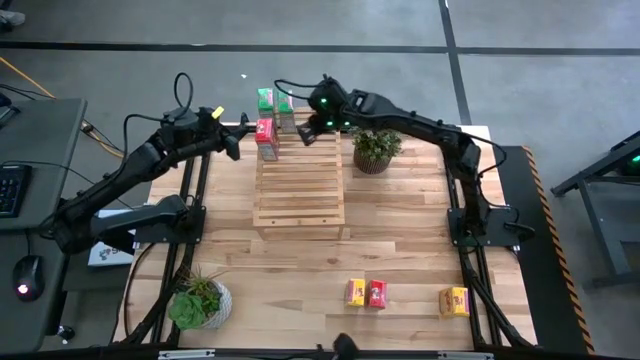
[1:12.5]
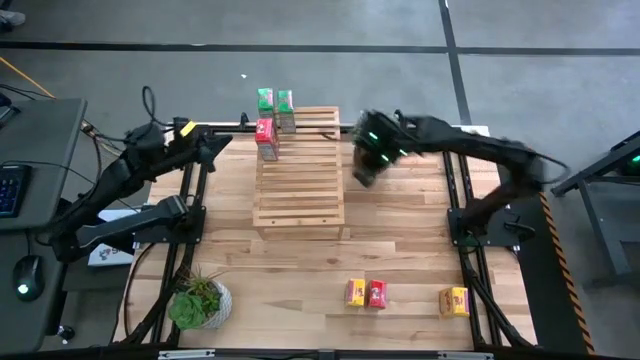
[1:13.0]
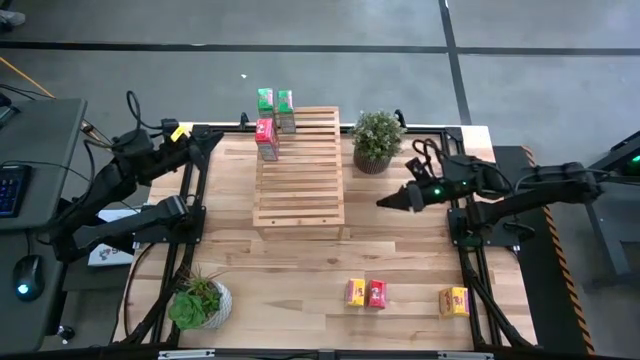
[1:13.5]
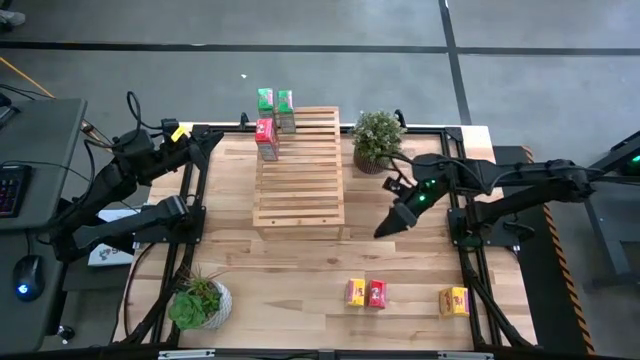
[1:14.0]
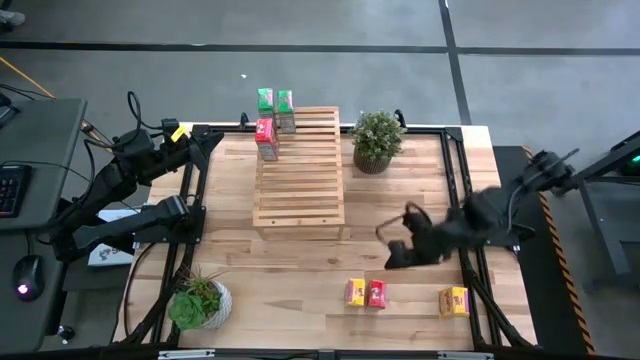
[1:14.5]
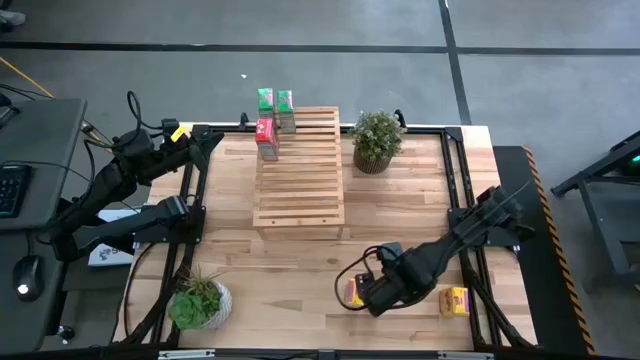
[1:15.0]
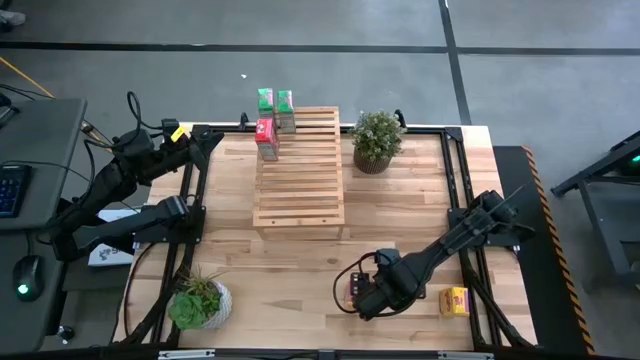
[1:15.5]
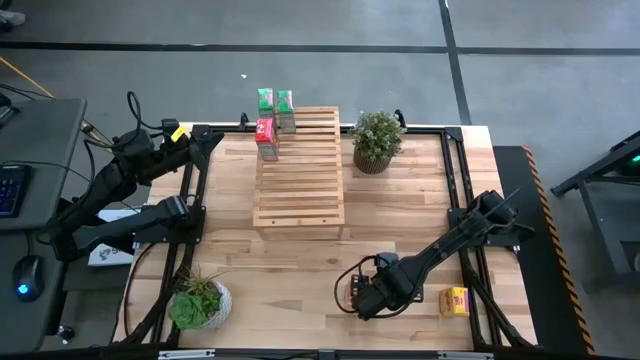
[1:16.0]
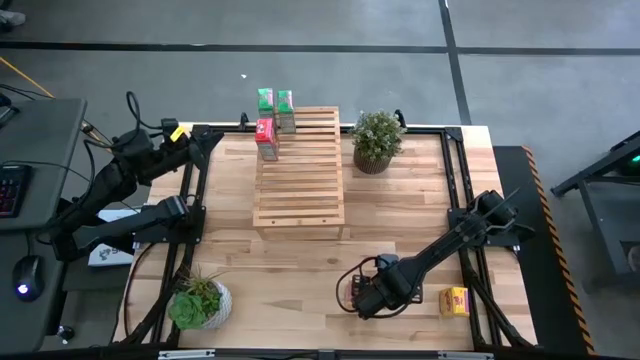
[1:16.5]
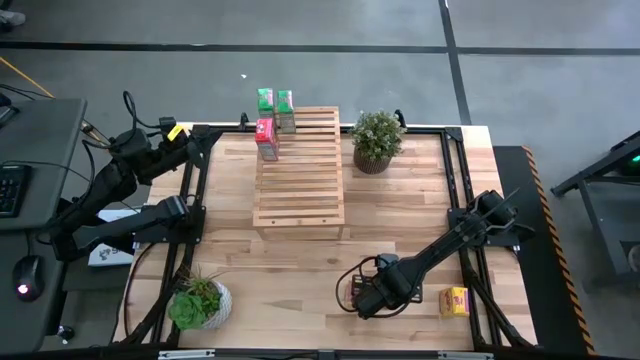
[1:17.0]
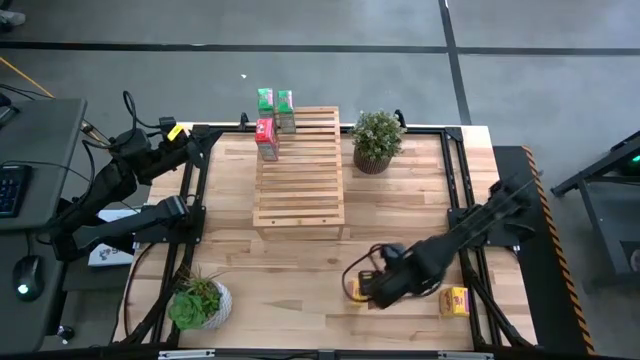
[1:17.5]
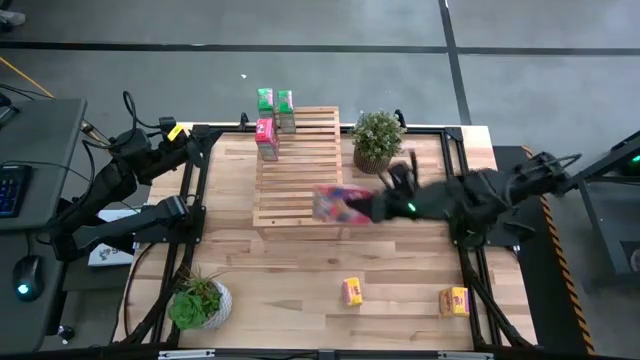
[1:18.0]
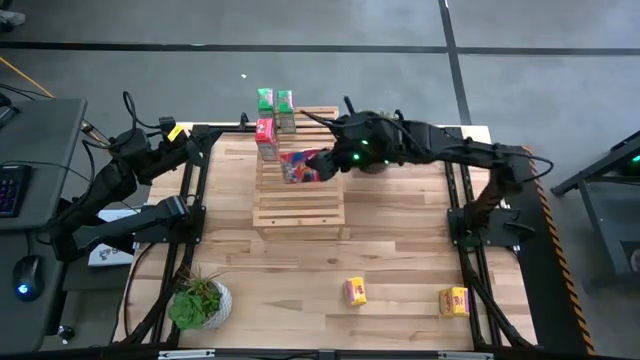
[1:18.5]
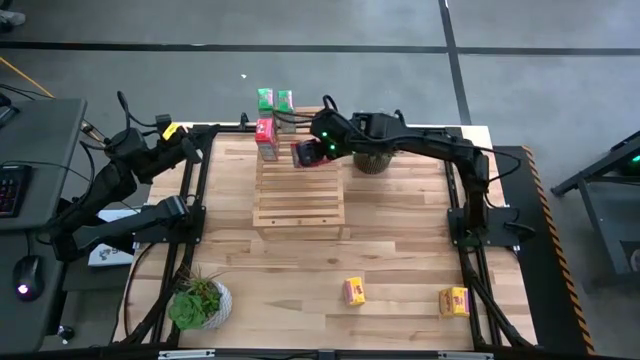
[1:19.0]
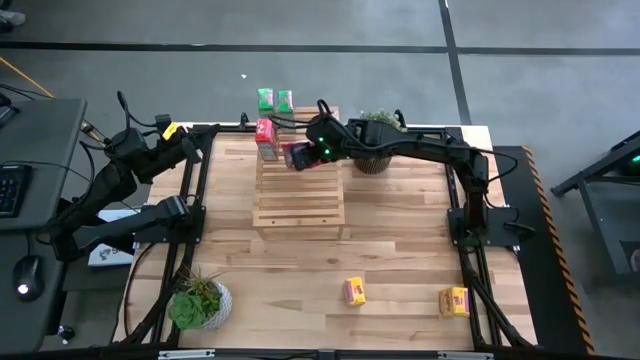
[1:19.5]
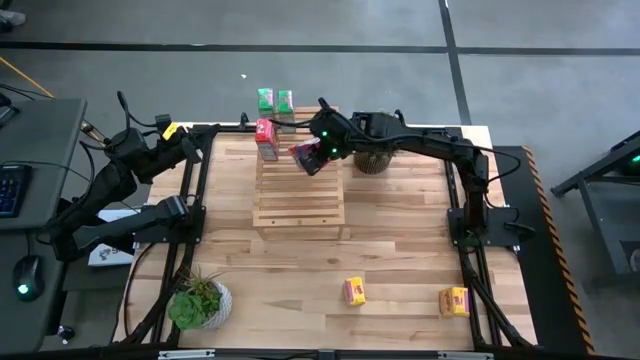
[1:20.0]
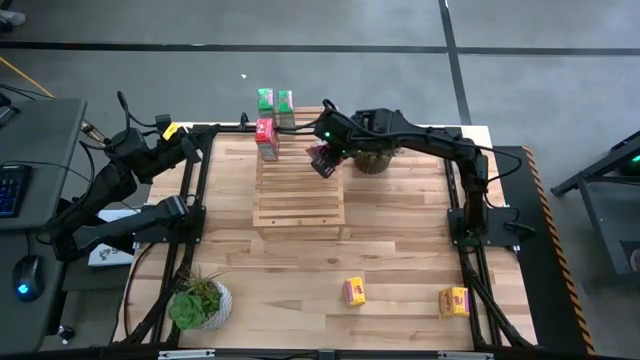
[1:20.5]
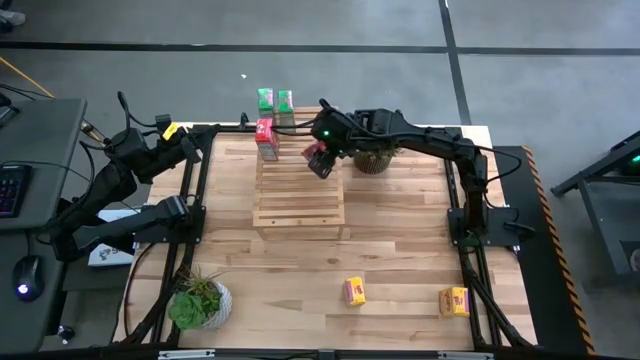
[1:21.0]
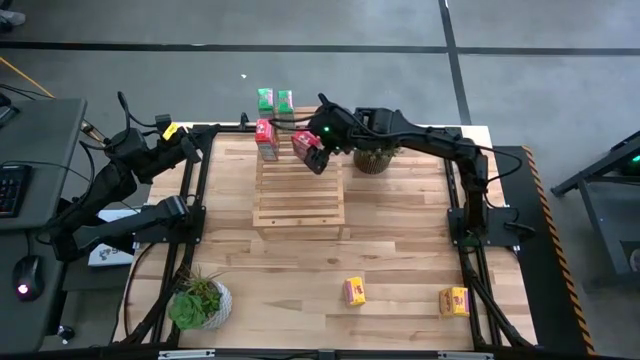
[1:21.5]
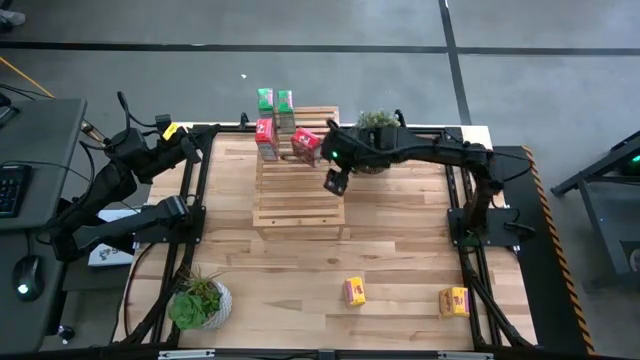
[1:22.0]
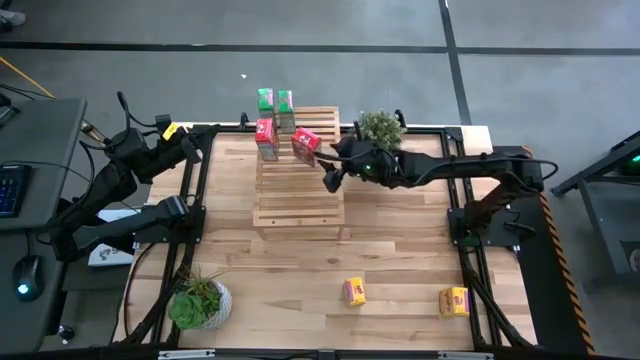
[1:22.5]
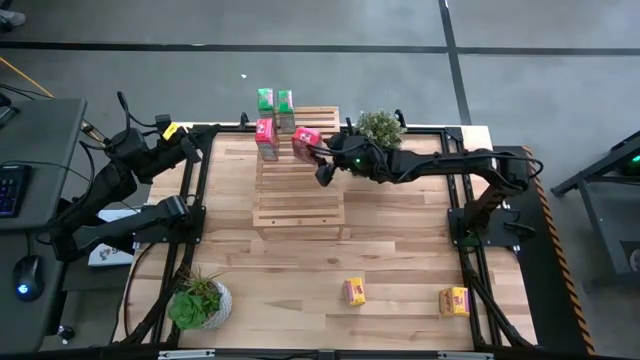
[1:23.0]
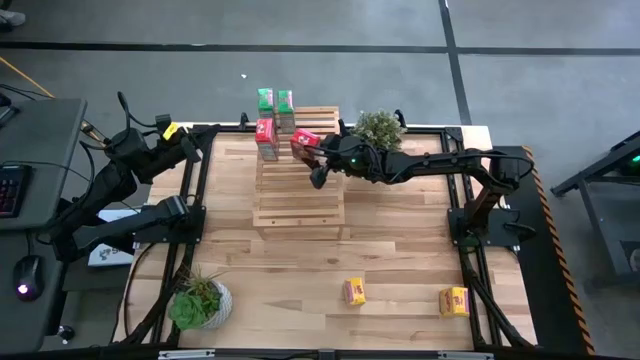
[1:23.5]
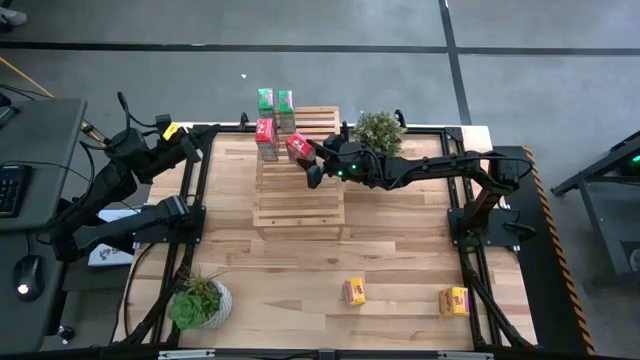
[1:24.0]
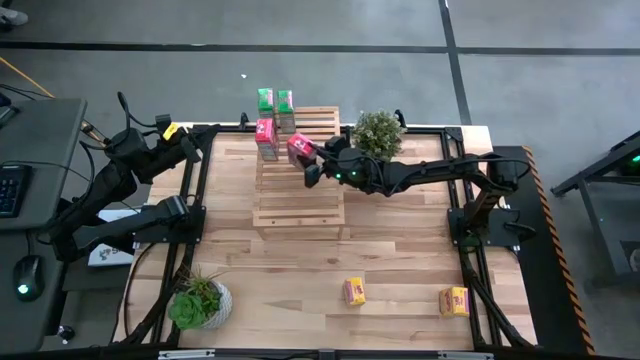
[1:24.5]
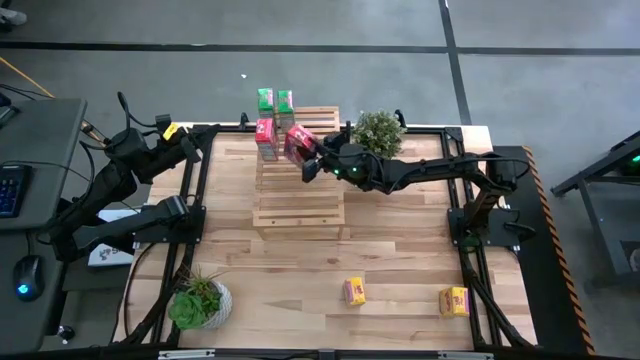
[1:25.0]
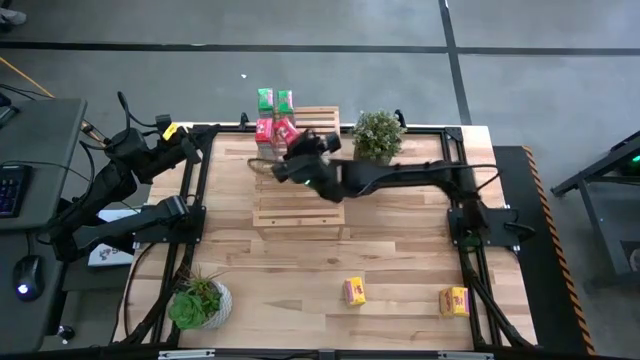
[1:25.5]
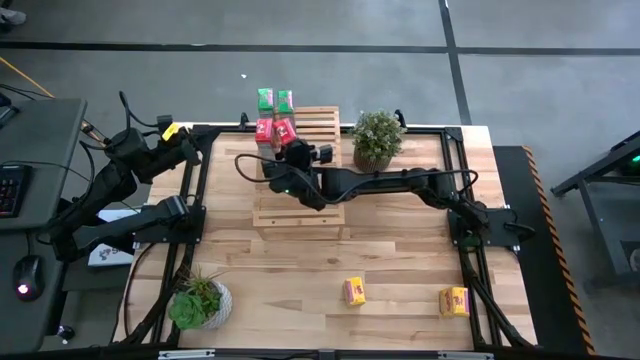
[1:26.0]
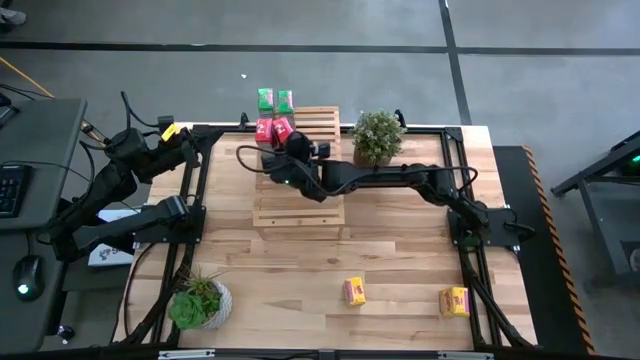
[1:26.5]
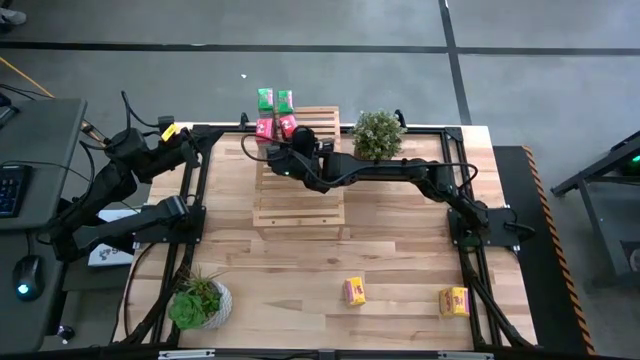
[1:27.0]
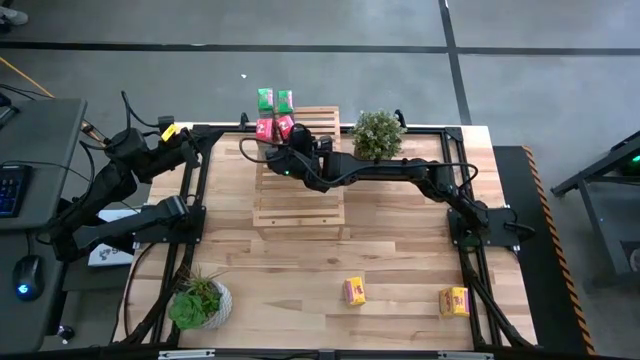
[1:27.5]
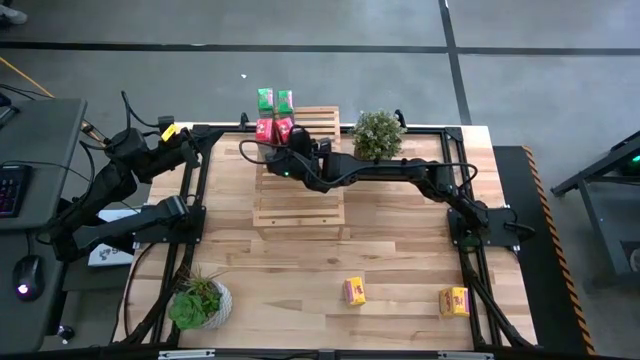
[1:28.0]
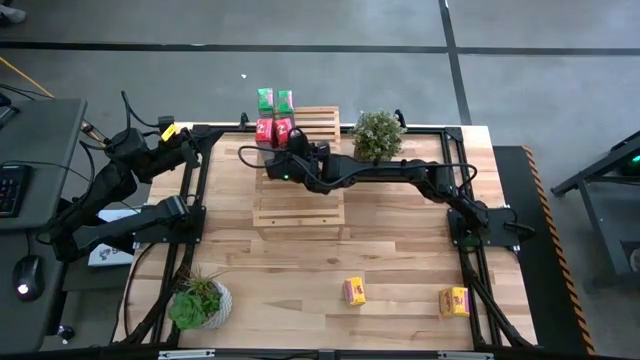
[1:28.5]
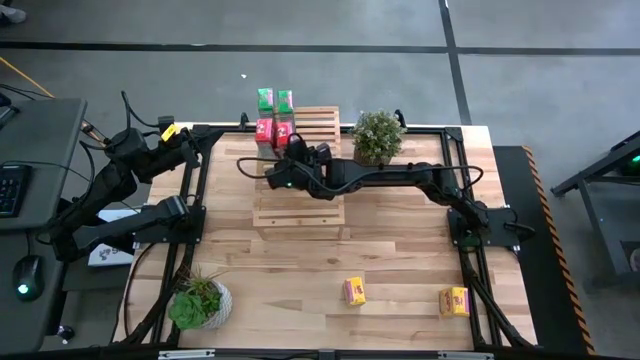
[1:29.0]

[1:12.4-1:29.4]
Task: Stack cereal on shelf
Put the red cereal box aligned with the other red cereal box on the shelf

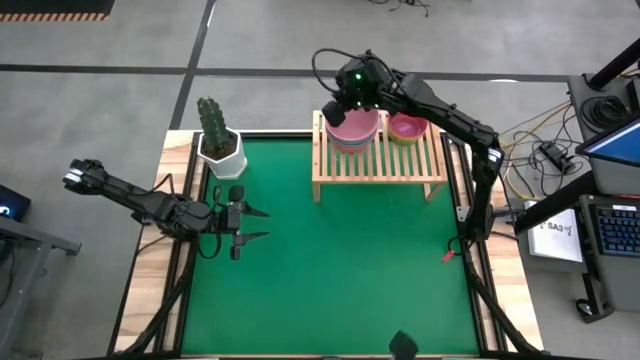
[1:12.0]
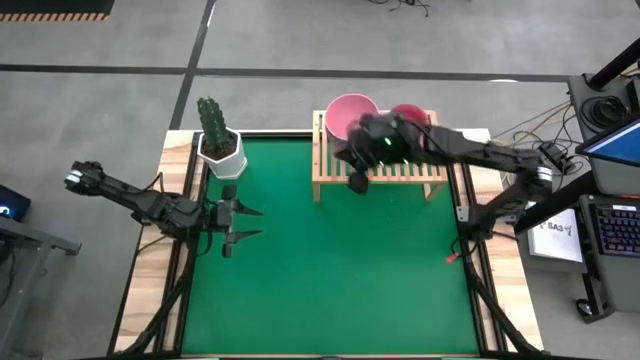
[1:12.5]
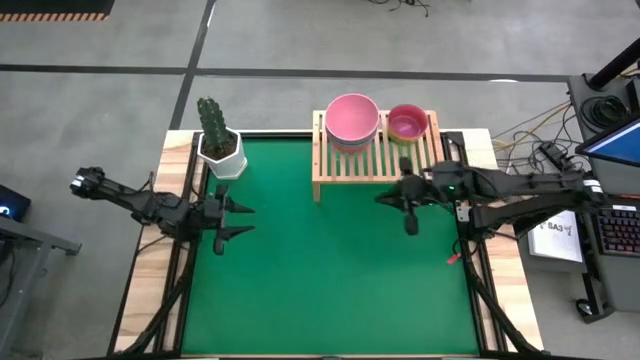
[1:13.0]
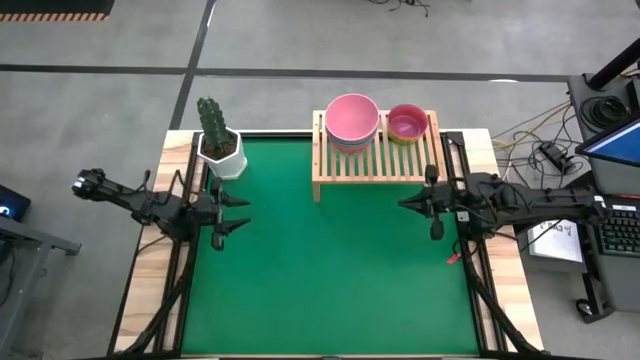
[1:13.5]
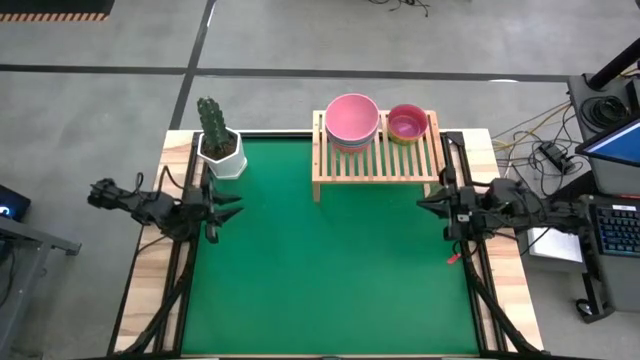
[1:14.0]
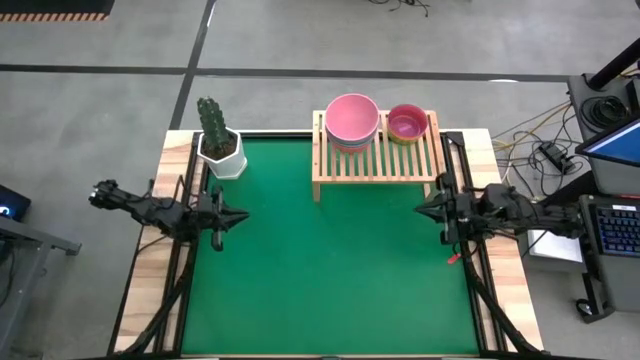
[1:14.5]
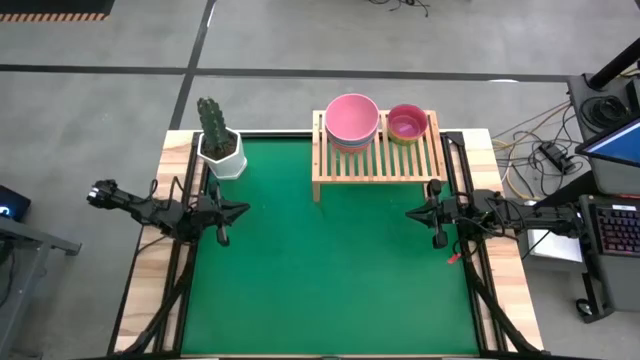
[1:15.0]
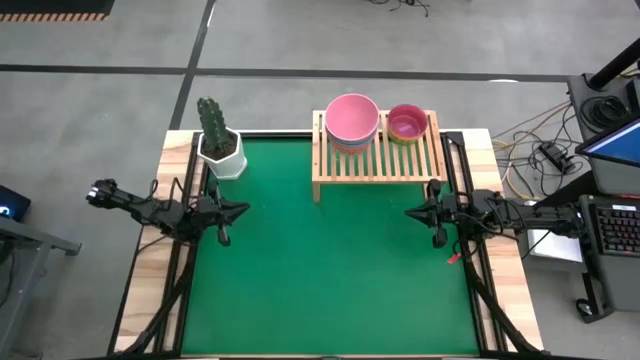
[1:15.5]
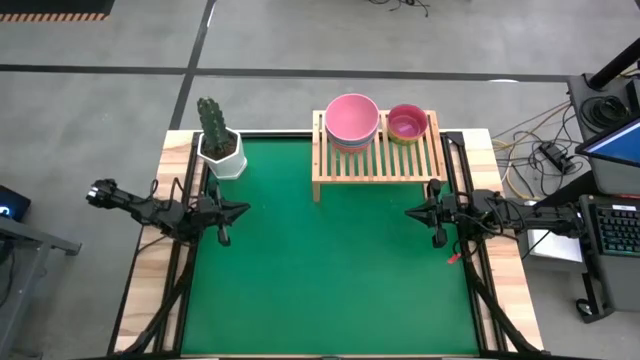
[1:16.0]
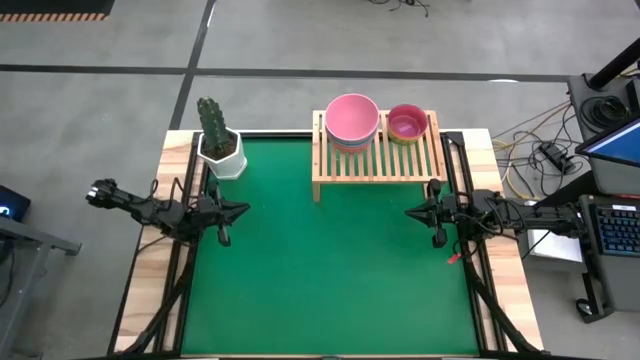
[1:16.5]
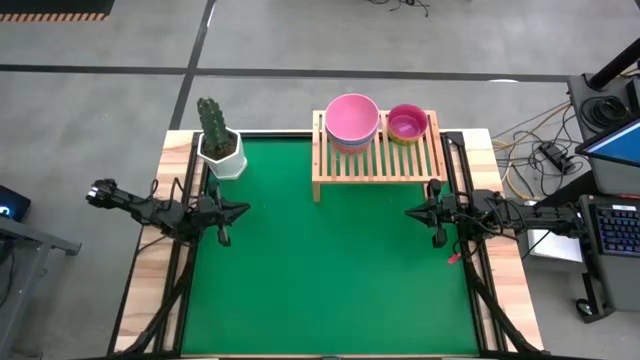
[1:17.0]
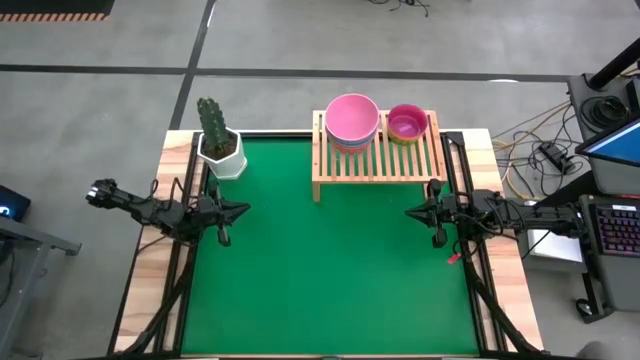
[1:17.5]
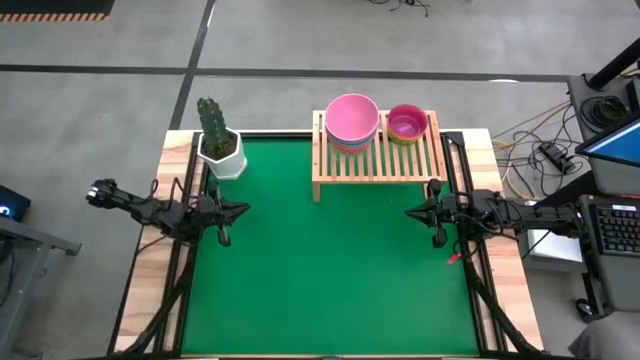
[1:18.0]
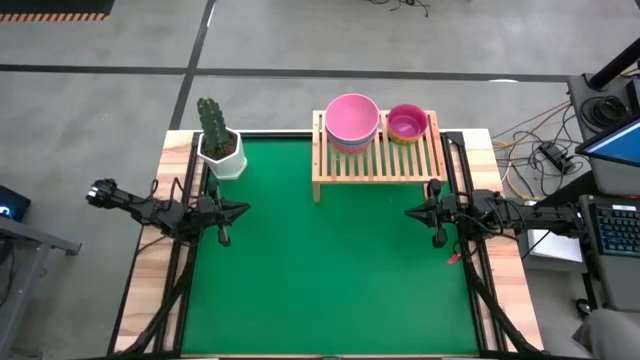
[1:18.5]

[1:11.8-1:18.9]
Task: Place and stack bowls onto a shelf
Return to Home Position
